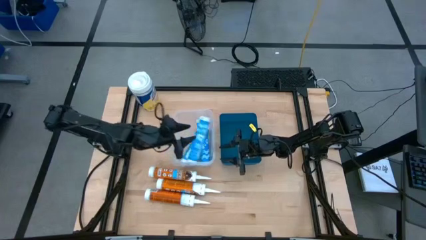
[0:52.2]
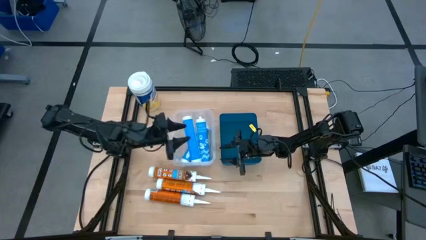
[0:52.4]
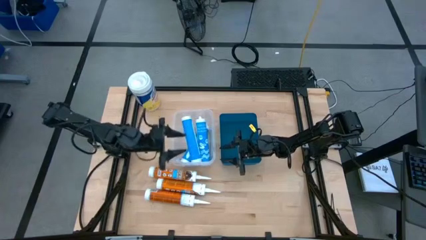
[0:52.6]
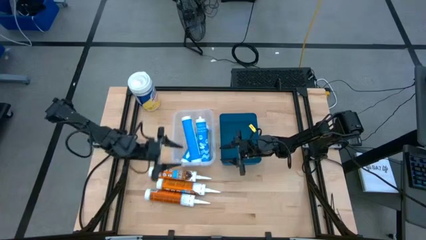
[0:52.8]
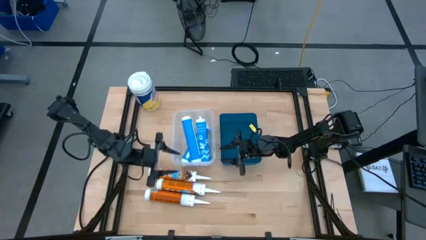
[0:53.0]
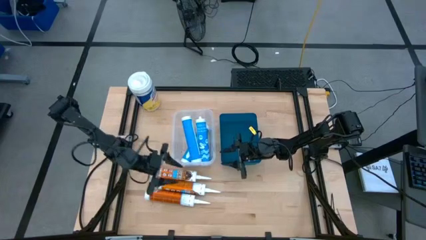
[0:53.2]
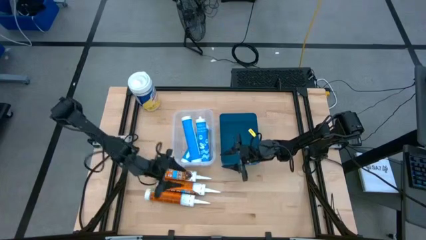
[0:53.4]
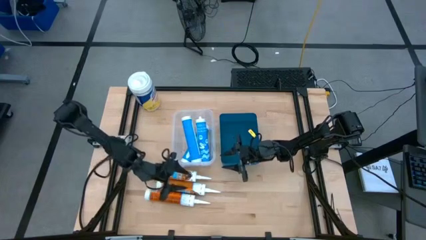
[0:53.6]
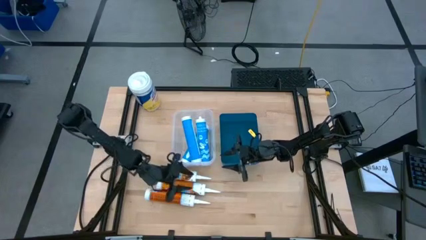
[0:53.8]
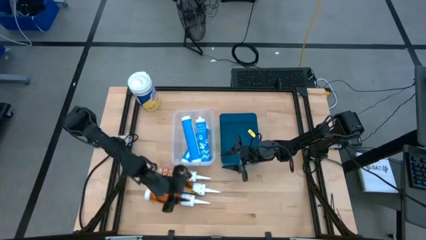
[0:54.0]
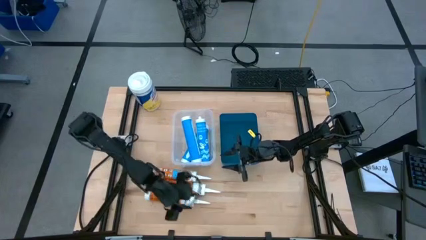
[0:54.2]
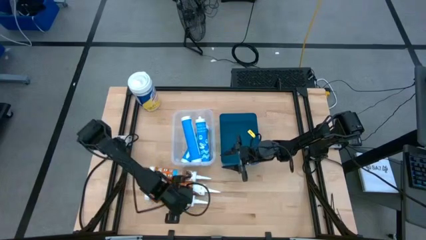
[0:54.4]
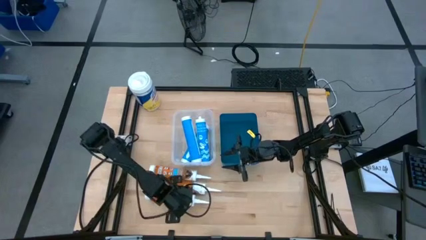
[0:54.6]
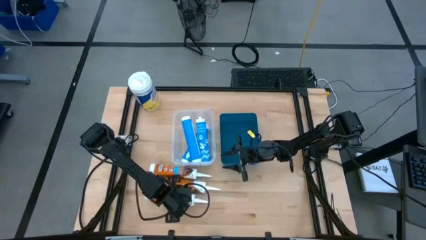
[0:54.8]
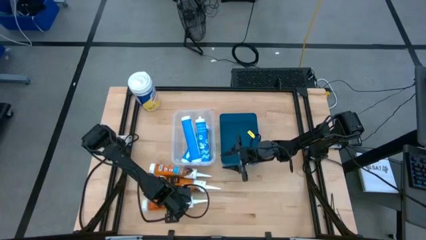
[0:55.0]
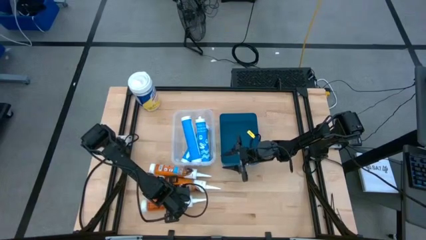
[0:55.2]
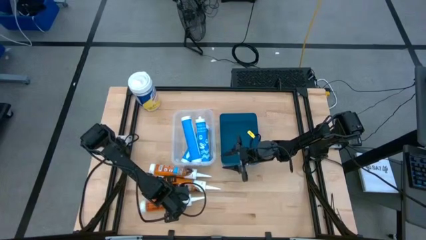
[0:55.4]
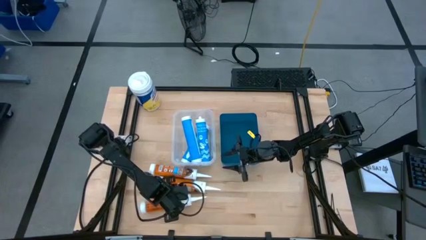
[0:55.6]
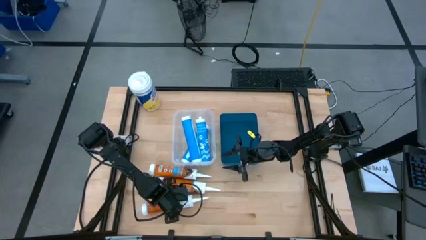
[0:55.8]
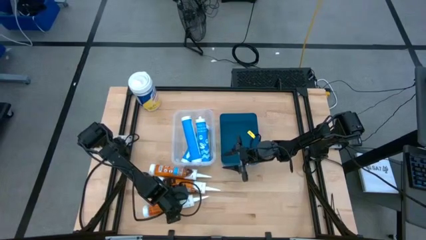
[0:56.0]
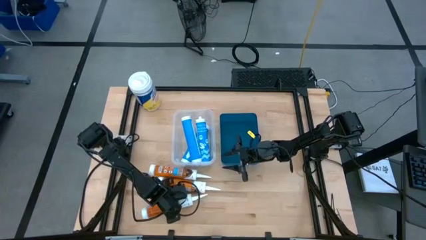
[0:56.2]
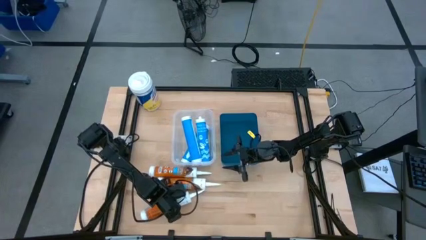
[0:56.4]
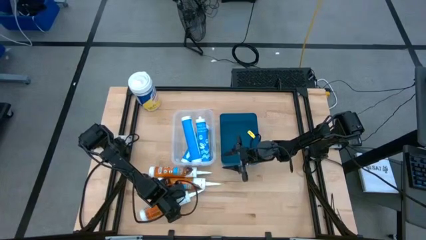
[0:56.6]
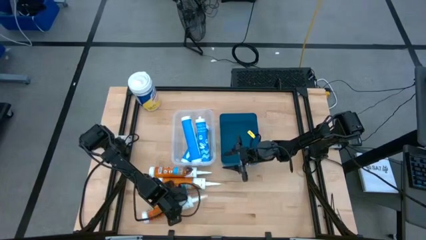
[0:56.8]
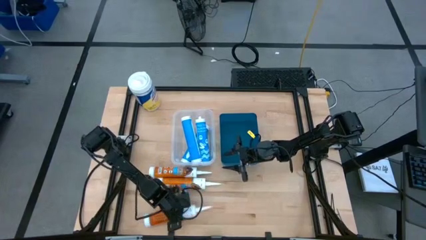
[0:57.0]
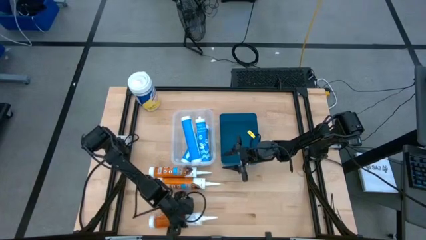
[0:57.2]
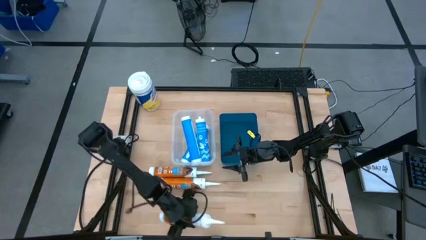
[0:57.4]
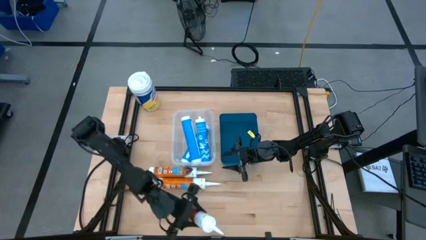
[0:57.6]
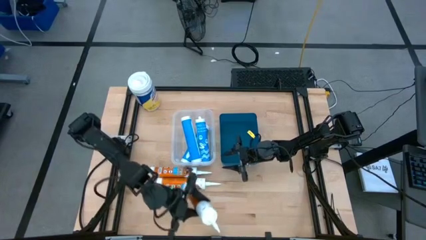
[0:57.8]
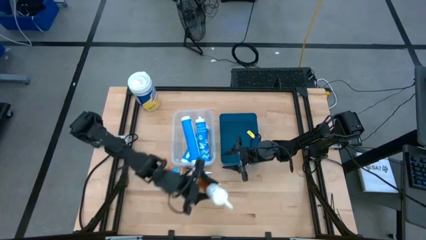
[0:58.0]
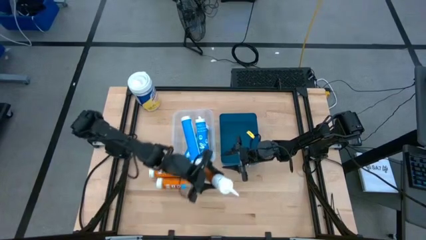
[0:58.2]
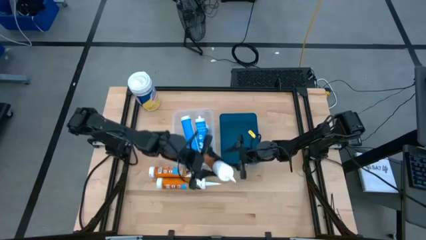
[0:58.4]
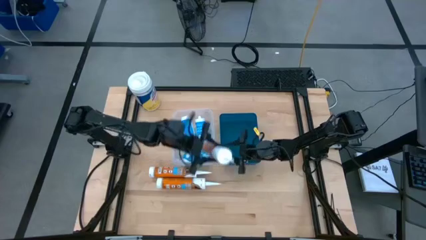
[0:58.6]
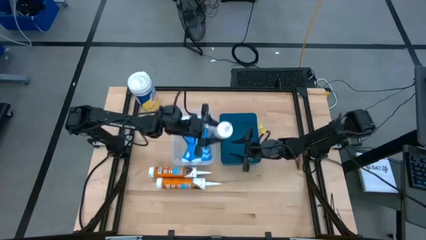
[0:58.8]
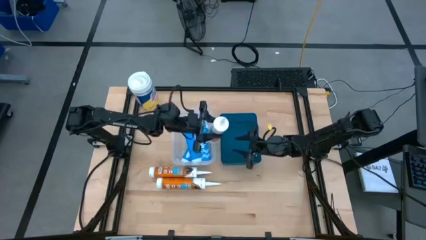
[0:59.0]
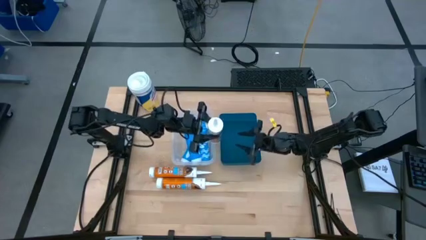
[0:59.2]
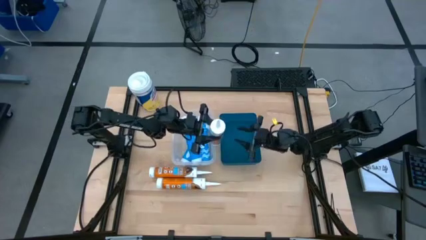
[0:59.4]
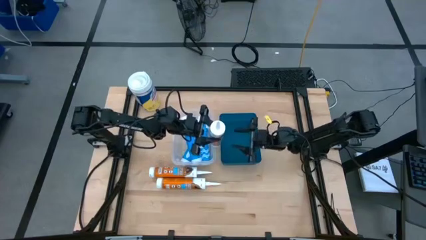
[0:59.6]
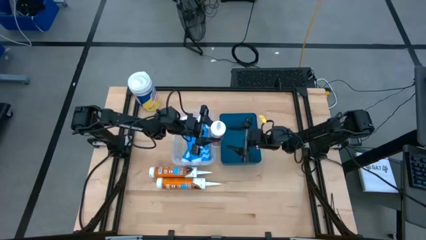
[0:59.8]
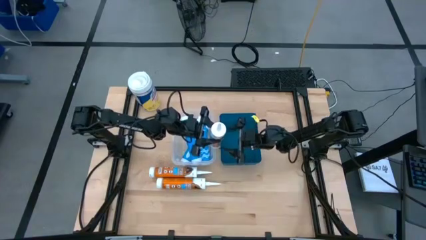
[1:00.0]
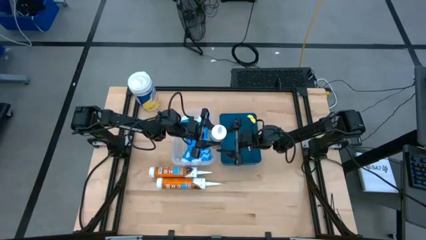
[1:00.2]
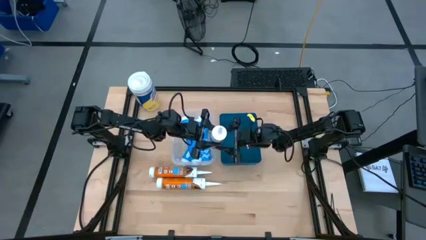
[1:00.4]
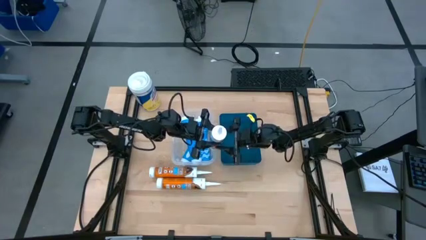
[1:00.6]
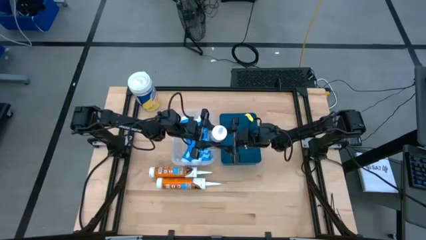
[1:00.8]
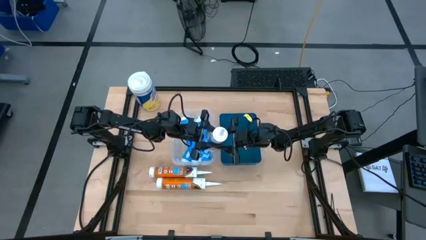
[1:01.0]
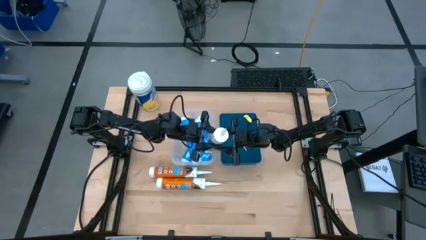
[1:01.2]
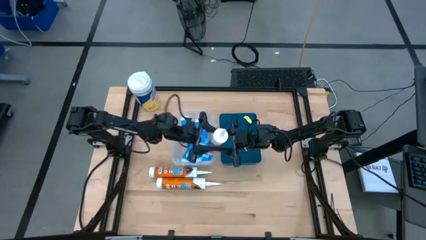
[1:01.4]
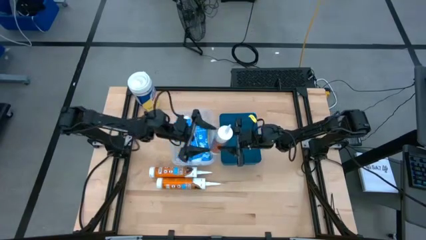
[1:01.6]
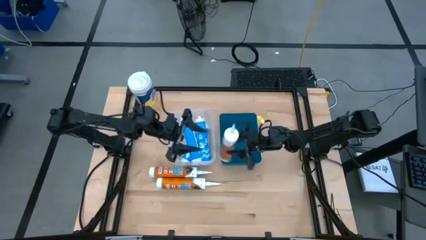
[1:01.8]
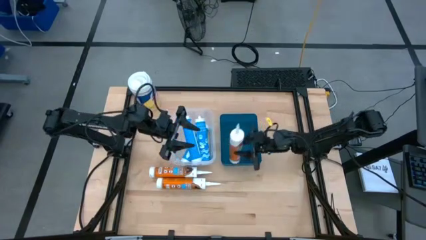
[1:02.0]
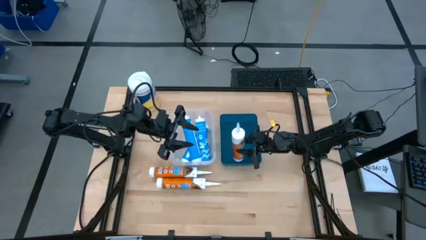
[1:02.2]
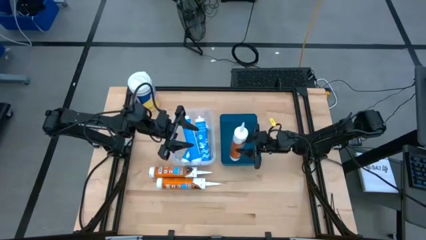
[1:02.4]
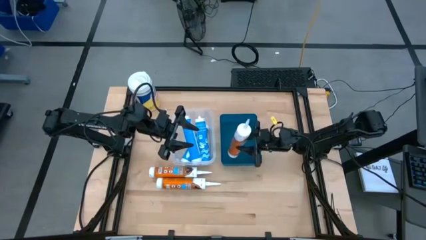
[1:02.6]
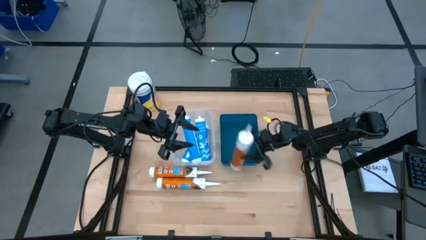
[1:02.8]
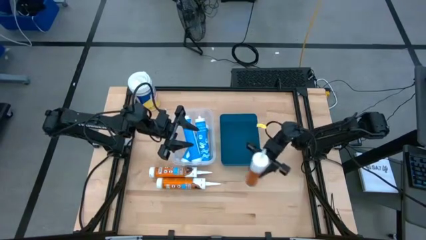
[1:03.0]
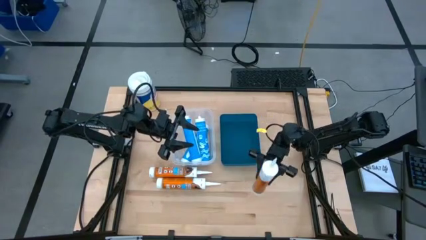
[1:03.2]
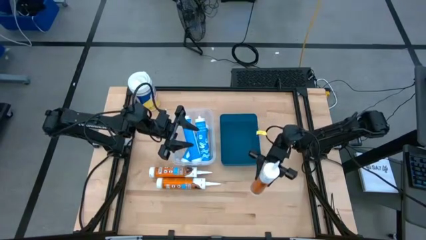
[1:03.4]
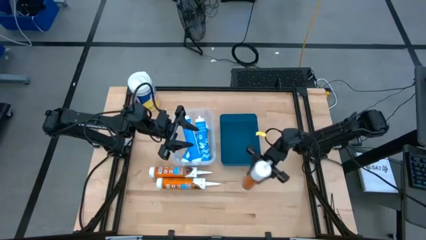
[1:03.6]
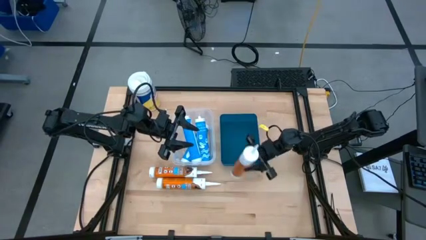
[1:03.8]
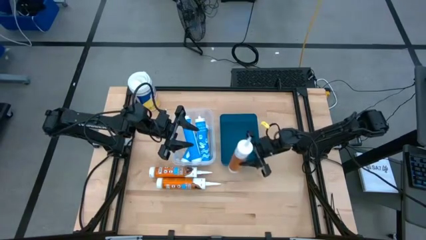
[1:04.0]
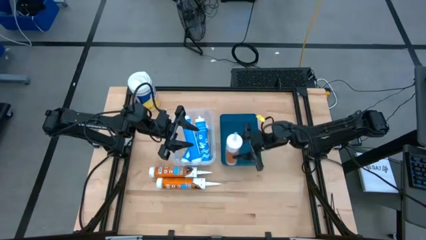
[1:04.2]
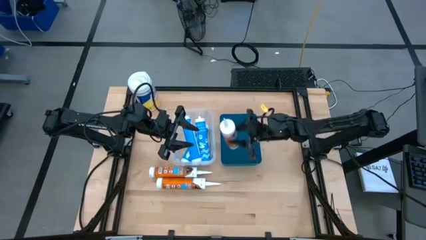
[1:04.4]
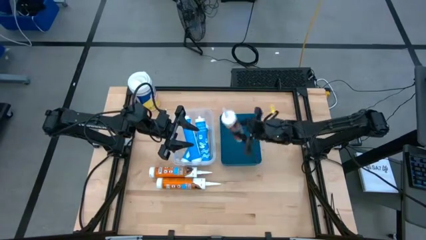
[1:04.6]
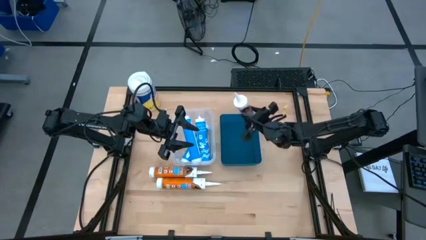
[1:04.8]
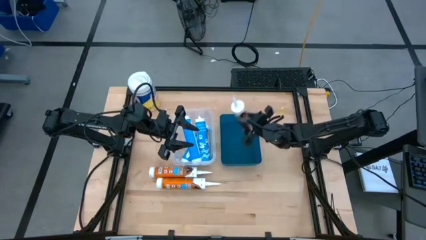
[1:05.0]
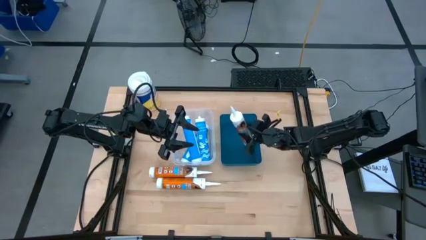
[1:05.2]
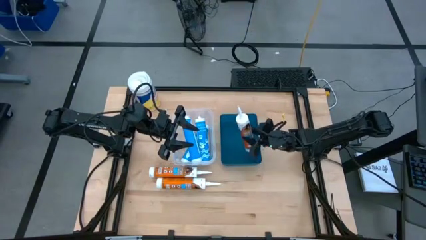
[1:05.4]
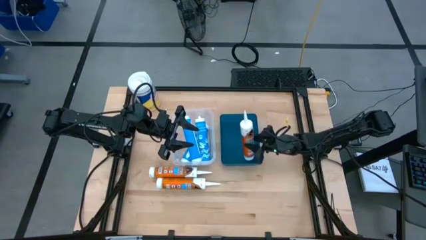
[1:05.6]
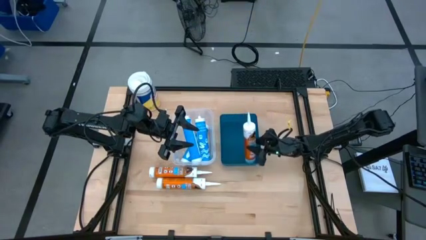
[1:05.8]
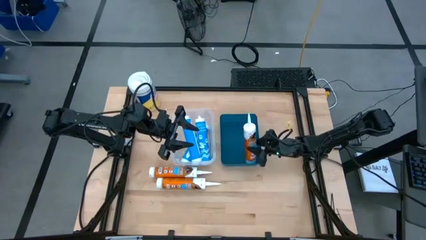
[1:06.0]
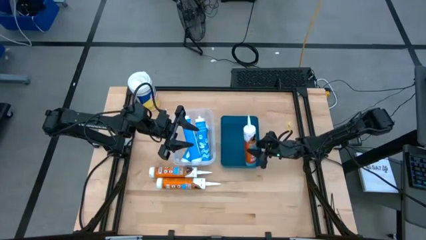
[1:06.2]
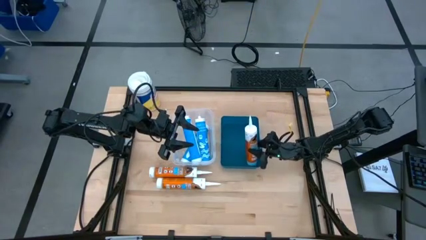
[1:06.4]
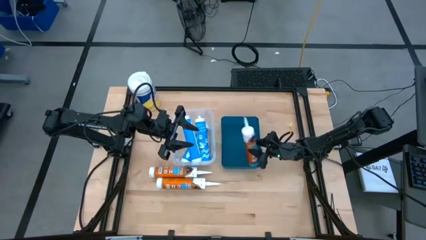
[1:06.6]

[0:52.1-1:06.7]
Task: Pick & place silicon tubes, Sealant and Lysol wipes
Put the bottom orange sealant into the blue bin
